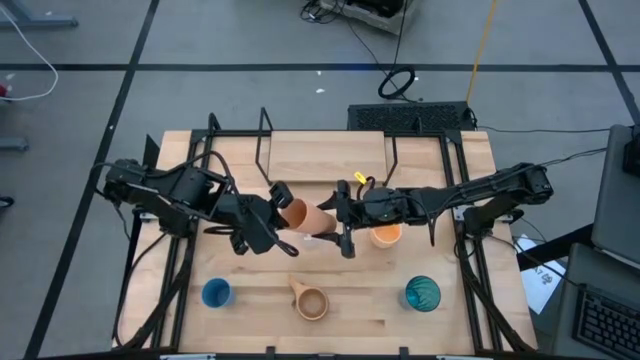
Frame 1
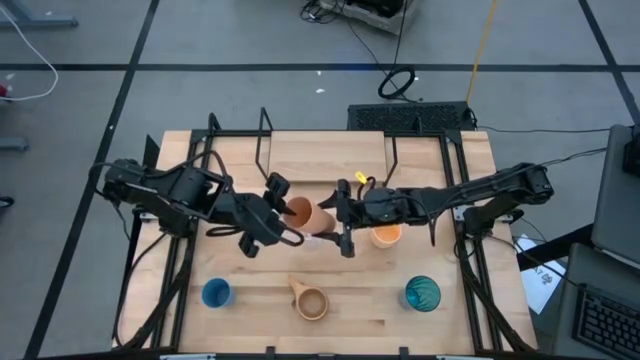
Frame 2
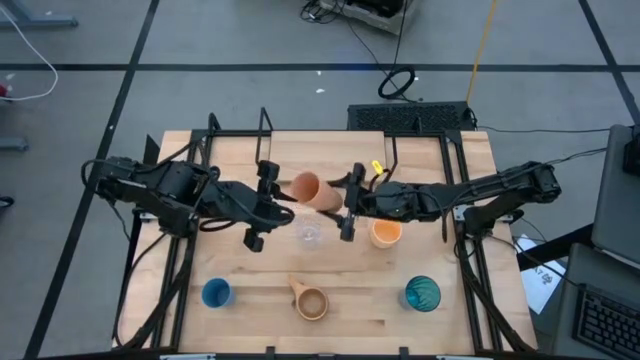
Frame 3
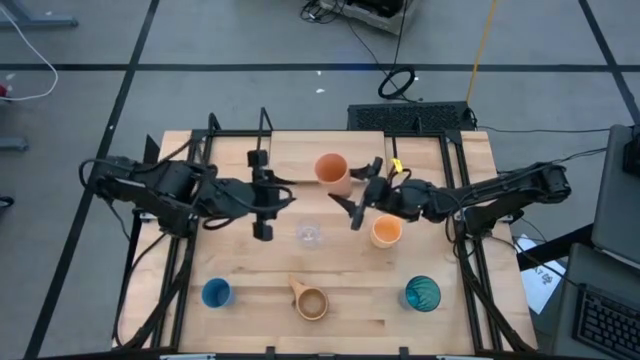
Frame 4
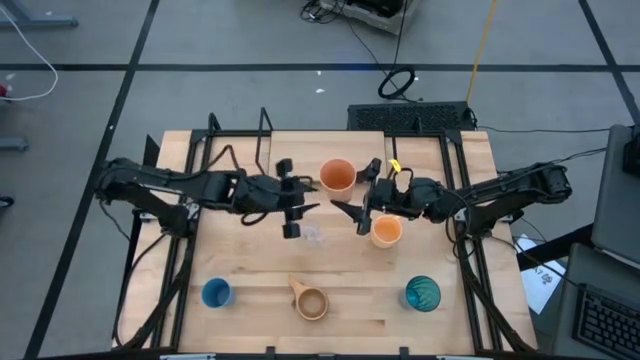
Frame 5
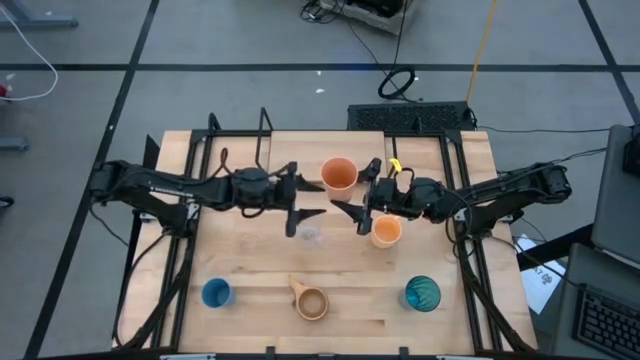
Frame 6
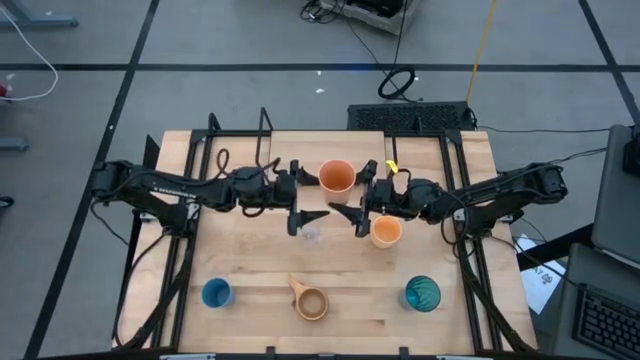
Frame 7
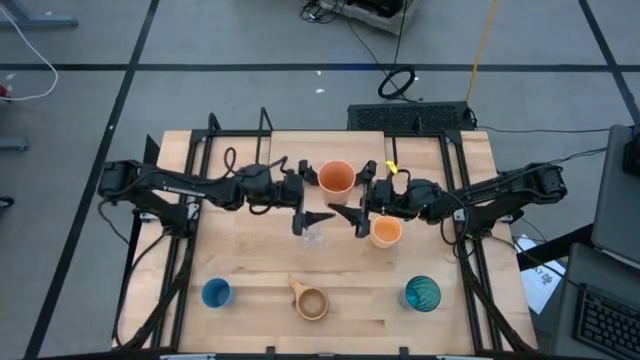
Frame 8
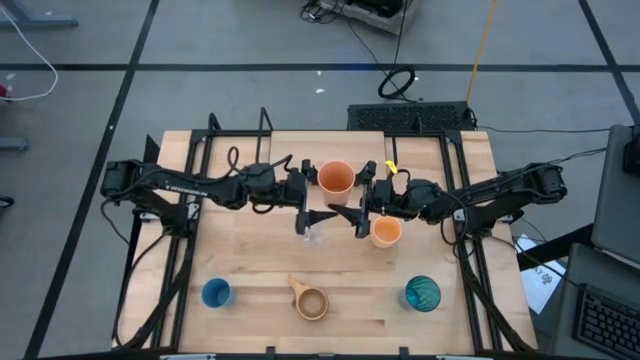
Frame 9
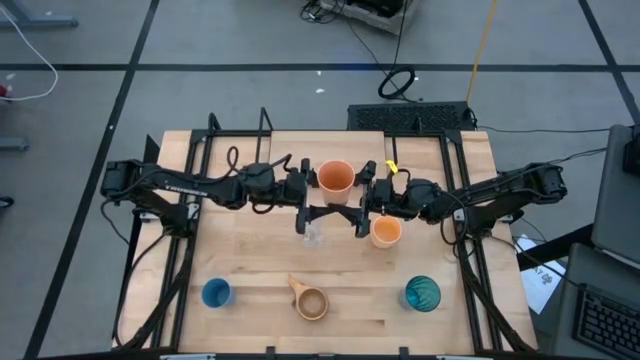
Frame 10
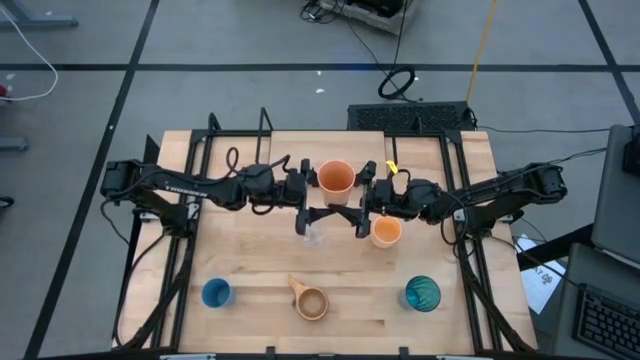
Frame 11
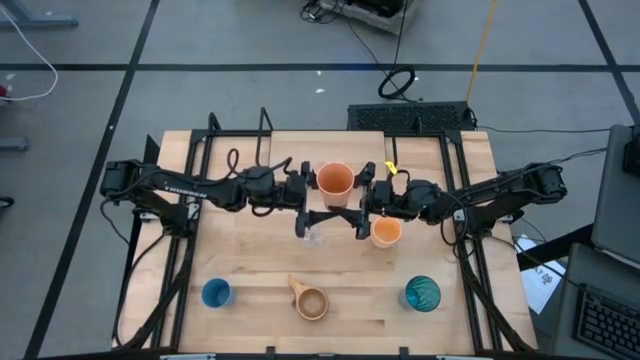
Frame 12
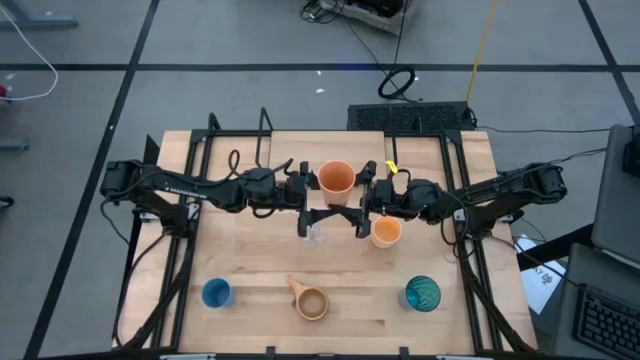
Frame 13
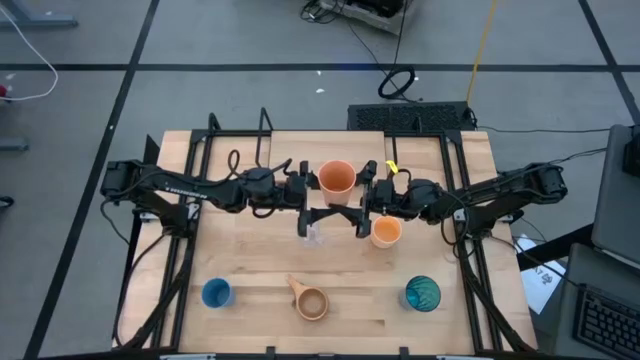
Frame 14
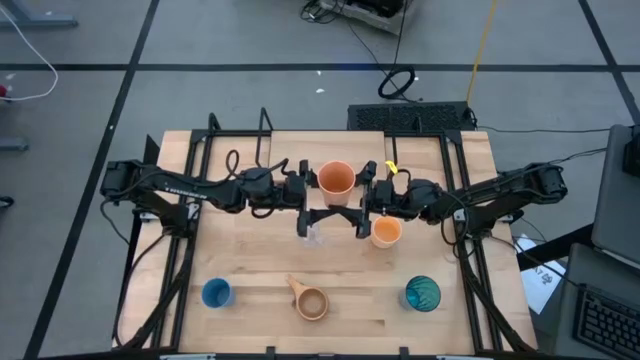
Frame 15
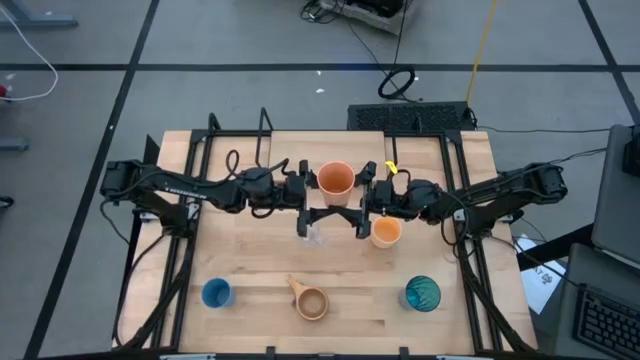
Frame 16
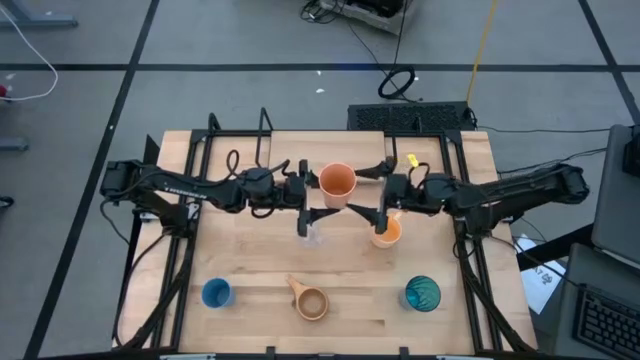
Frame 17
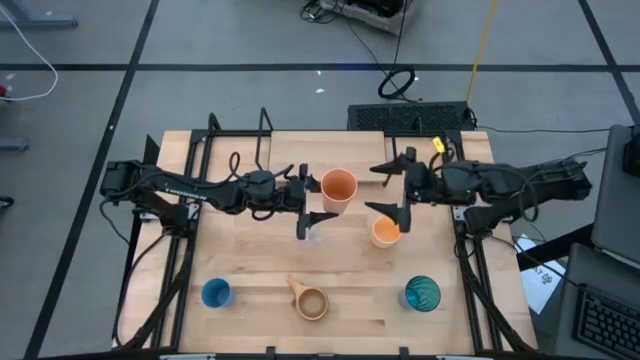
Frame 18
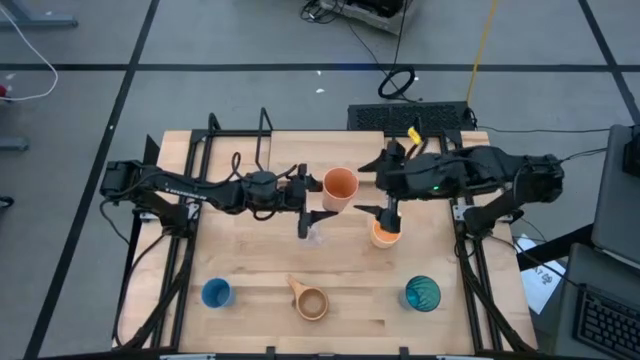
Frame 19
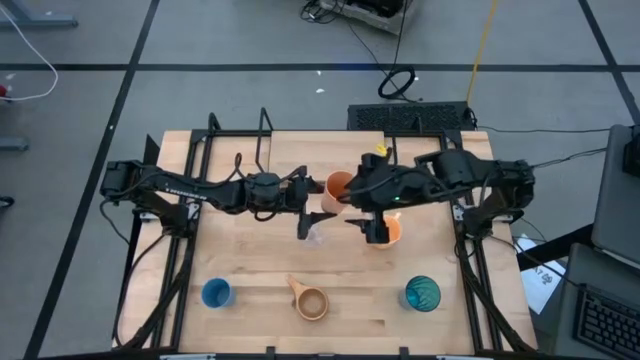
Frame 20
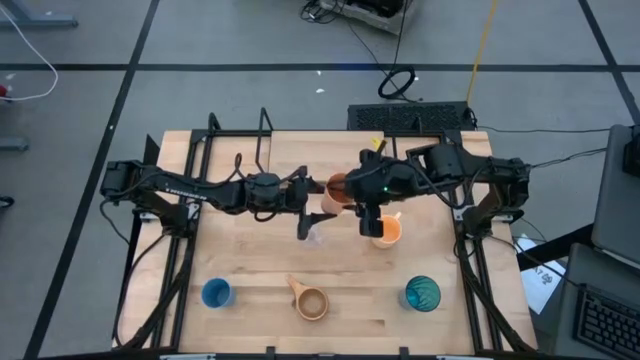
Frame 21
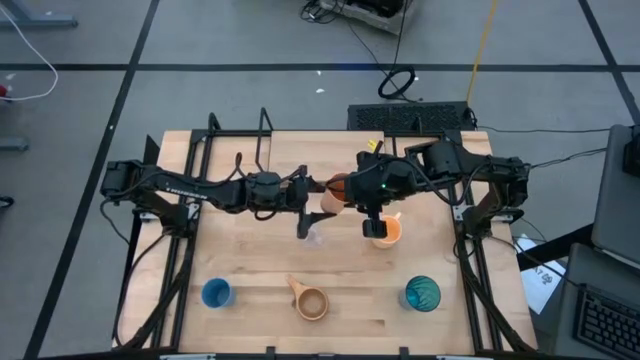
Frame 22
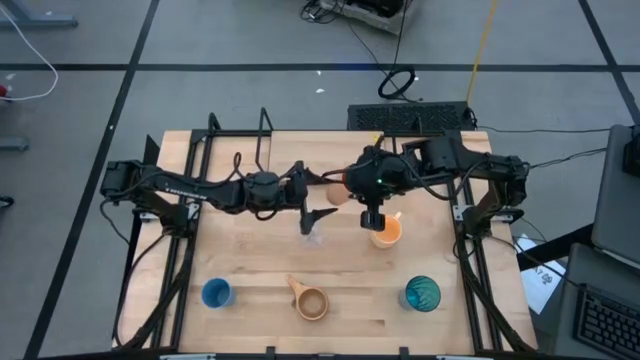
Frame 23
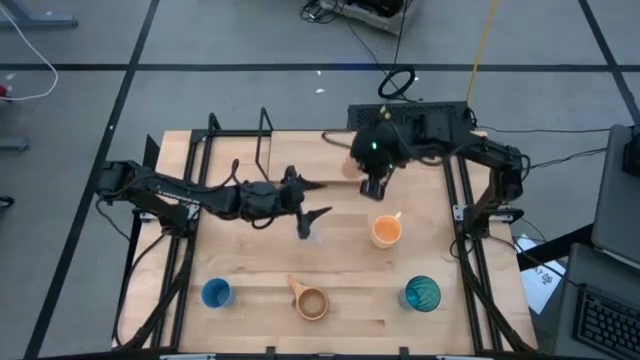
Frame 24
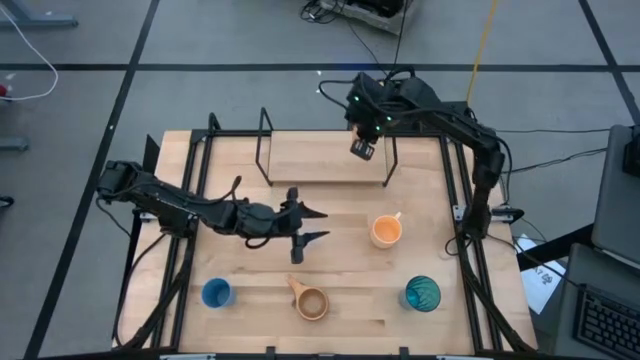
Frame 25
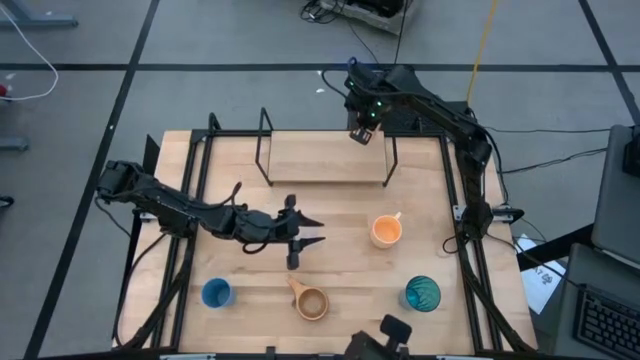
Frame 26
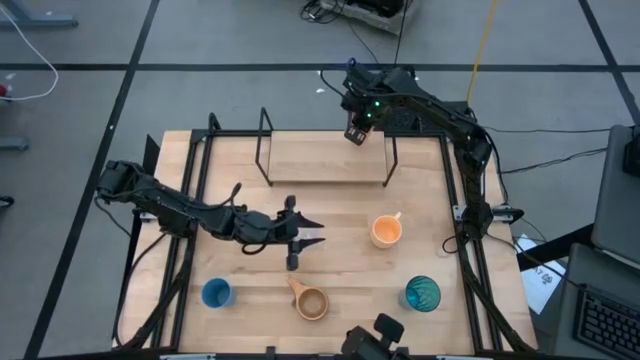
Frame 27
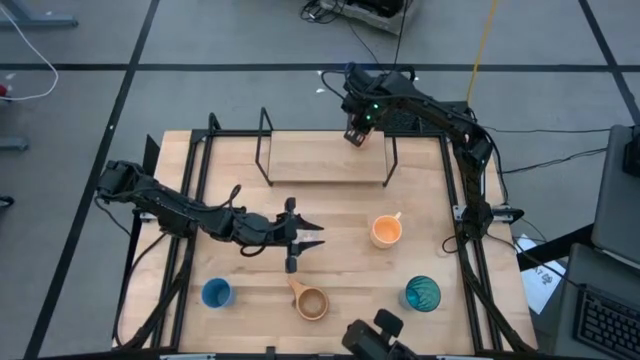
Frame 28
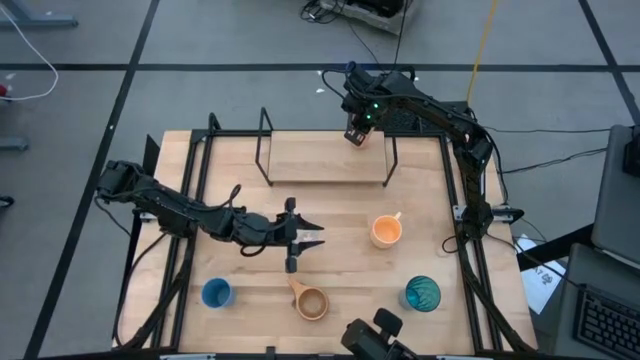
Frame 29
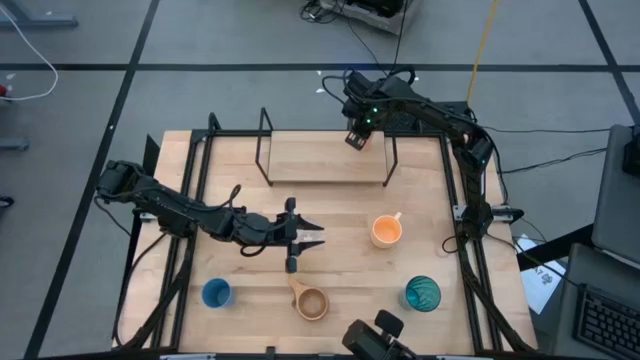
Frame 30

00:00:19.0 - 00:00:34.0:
Task: Stack small to large cups/mugs on shelf
Put the light orange cup on the shelf

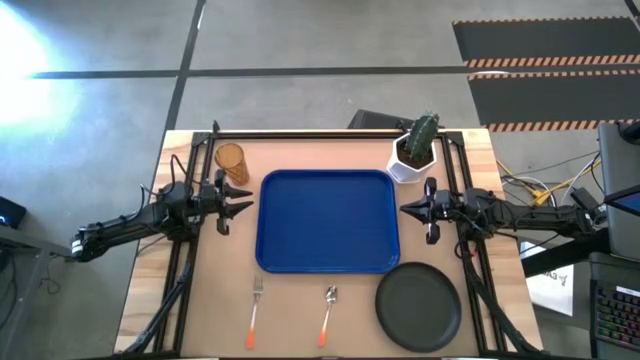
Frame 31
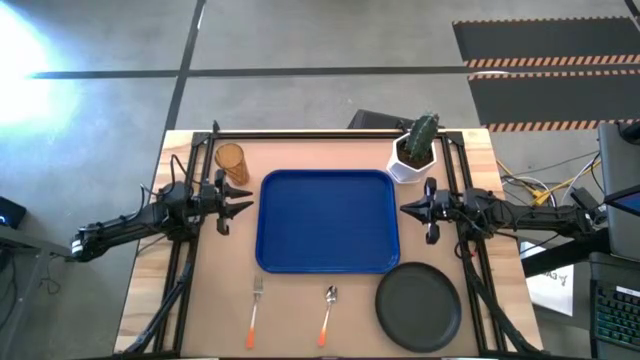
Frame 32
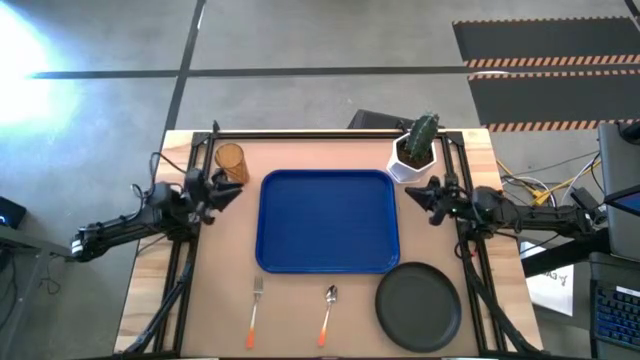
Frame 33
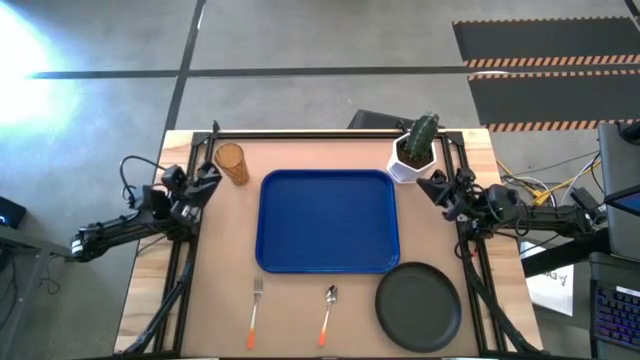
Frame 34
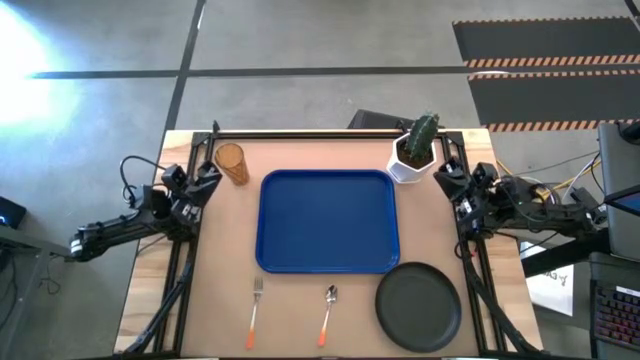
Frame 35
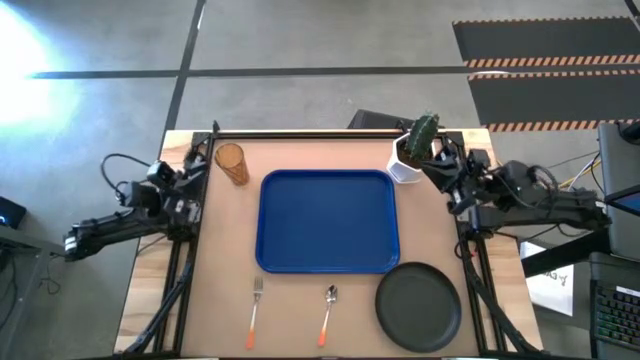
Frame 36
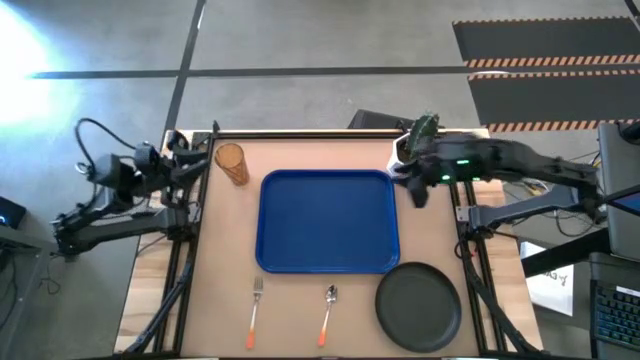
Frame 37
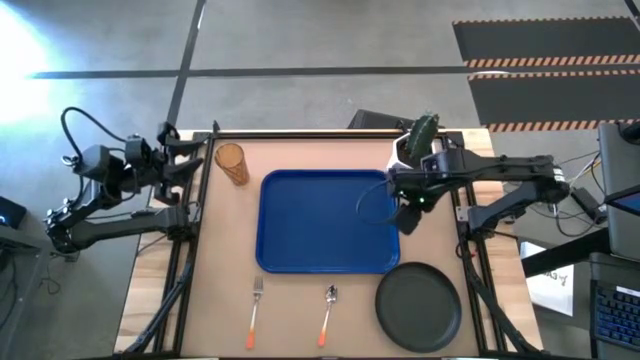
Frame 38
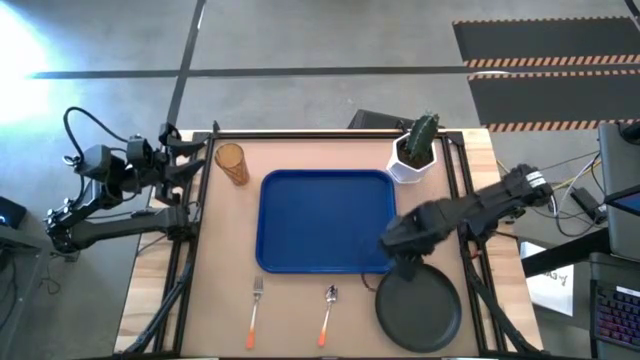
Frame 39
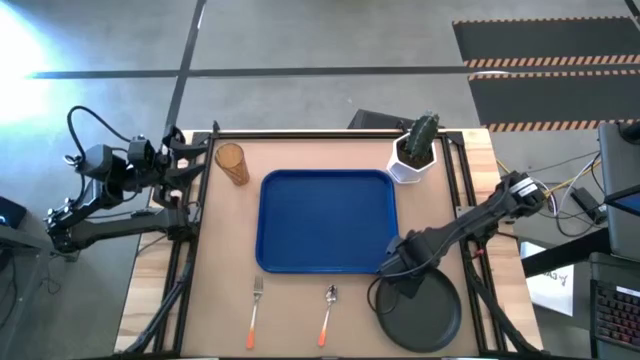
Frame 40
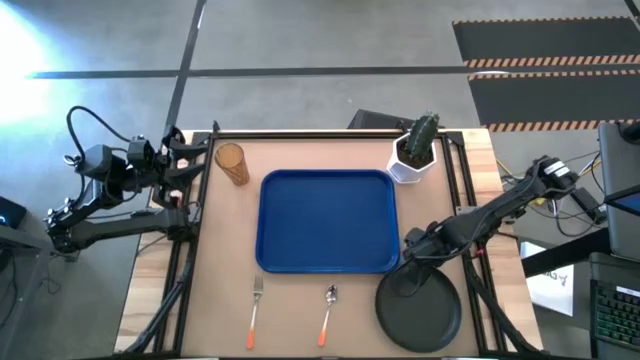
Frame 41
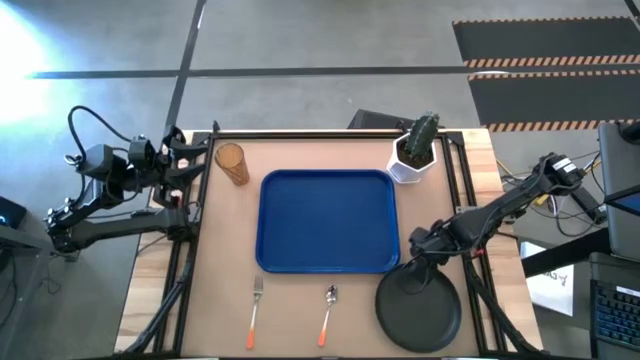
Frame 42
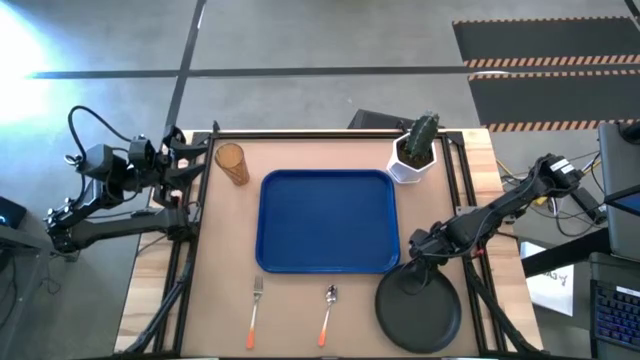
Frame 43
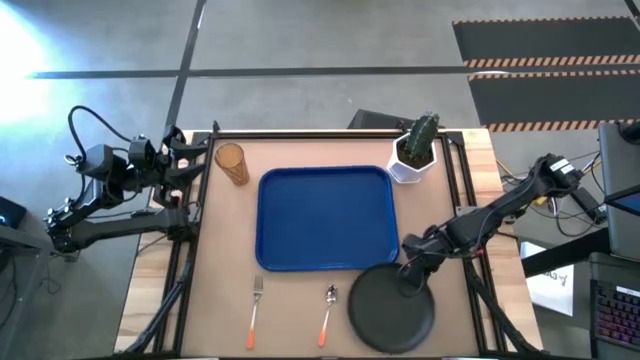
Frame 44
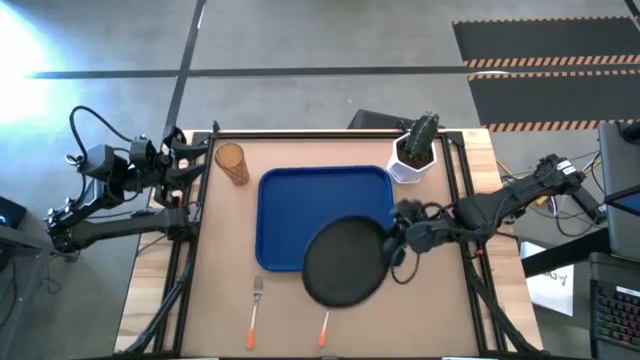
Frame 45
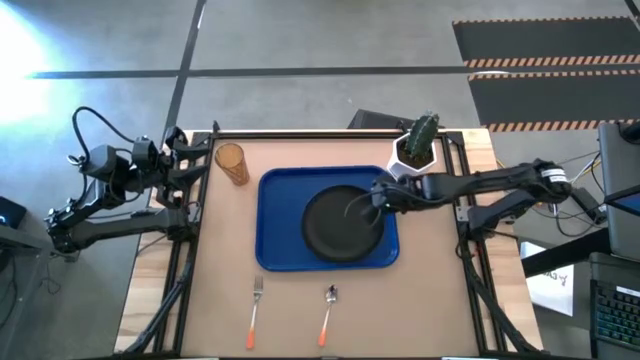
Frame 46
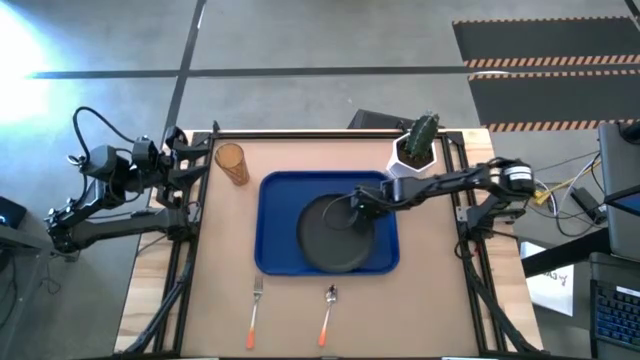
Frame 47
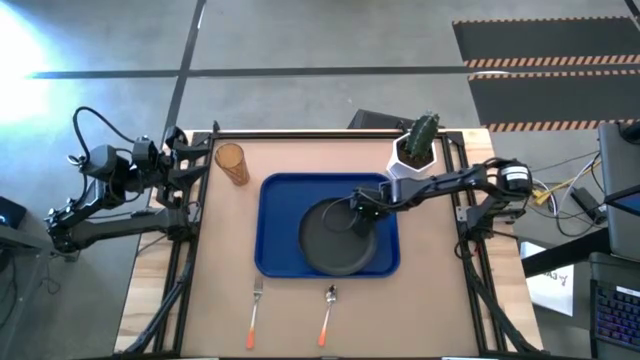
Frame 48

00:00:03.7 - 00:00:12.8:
Task: Pick and place plate/cup/fork/spoon on tray
Put the black plate on the blue tray
